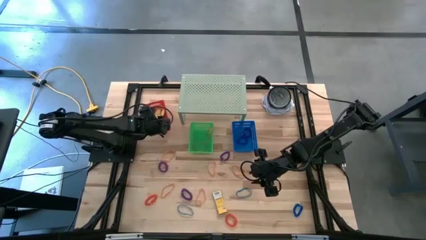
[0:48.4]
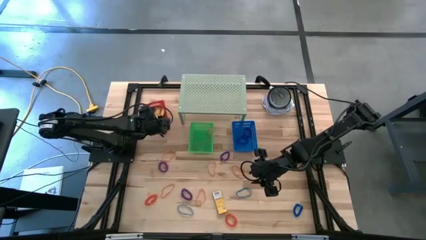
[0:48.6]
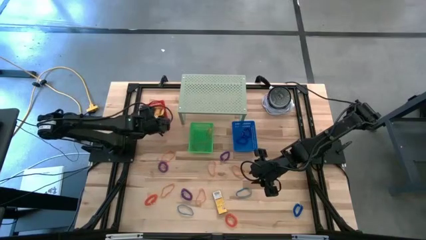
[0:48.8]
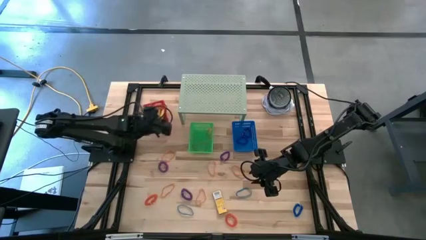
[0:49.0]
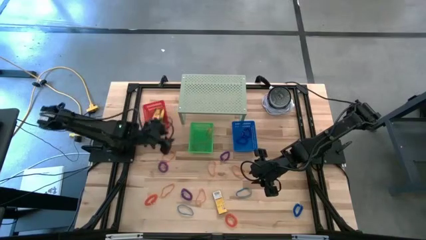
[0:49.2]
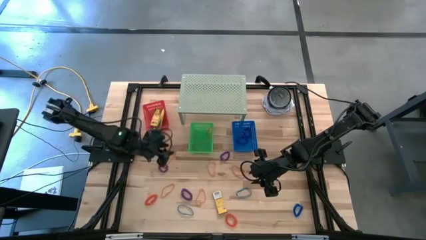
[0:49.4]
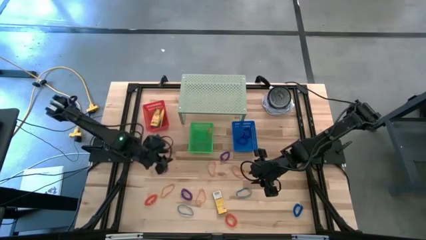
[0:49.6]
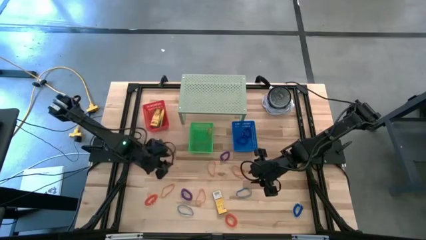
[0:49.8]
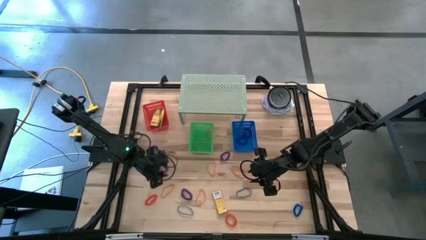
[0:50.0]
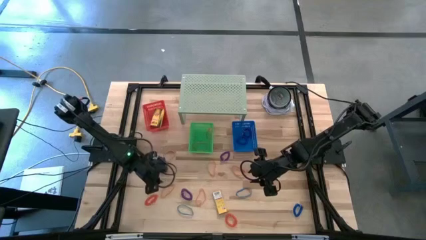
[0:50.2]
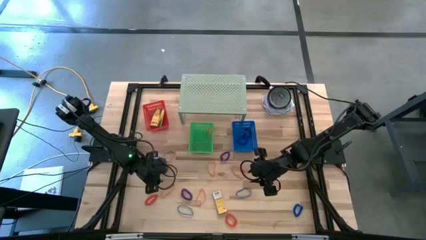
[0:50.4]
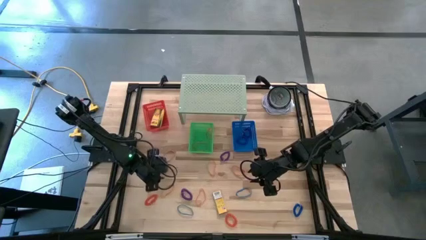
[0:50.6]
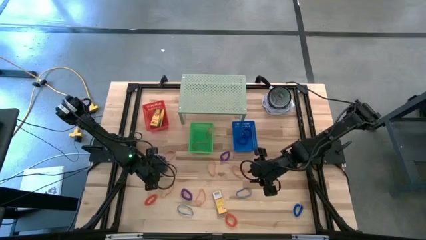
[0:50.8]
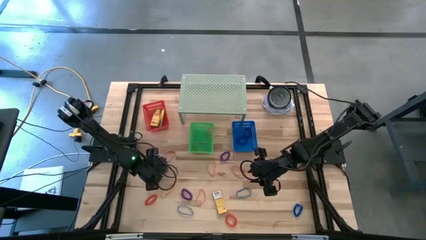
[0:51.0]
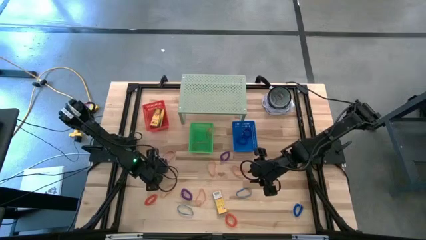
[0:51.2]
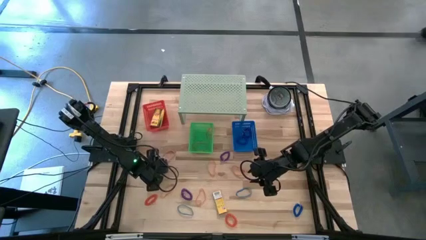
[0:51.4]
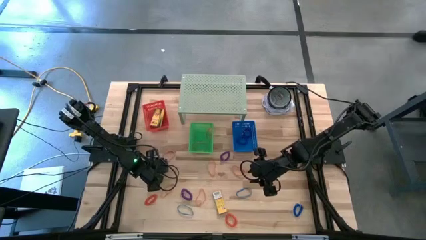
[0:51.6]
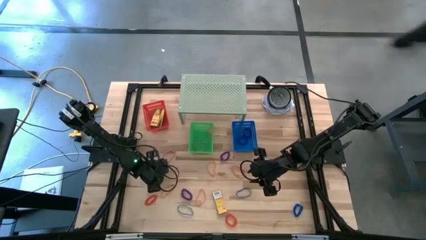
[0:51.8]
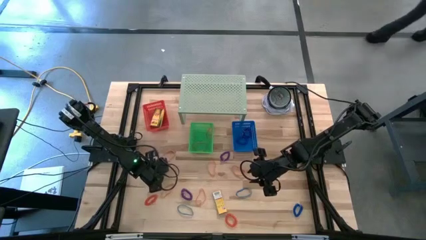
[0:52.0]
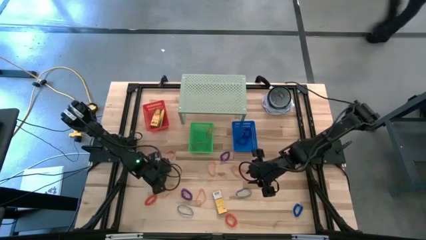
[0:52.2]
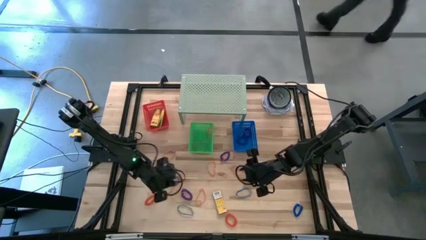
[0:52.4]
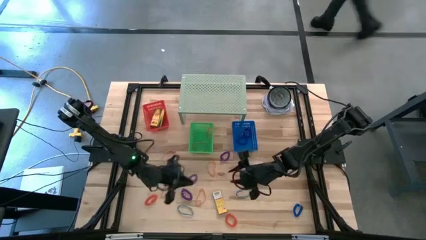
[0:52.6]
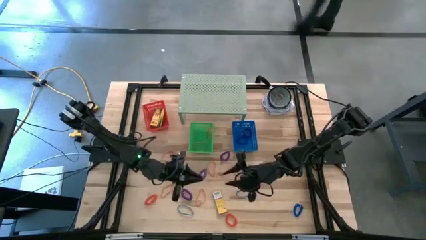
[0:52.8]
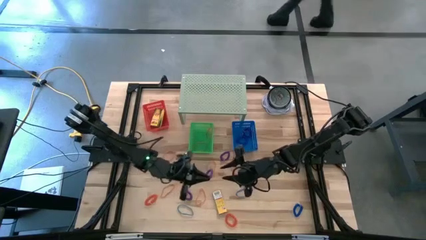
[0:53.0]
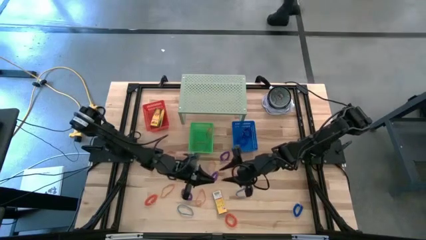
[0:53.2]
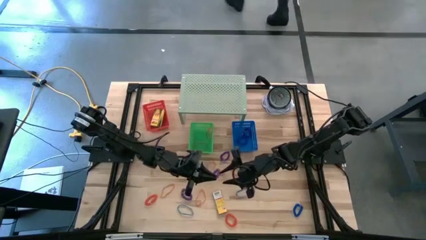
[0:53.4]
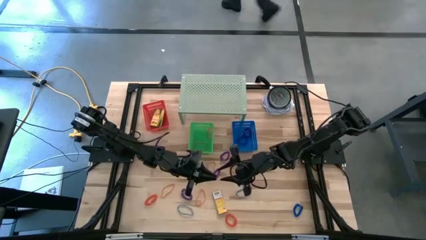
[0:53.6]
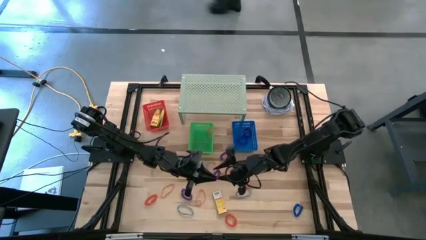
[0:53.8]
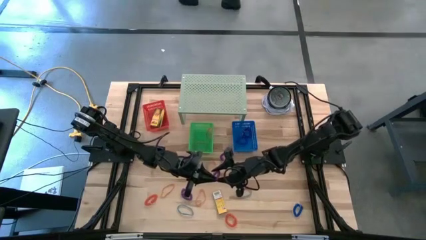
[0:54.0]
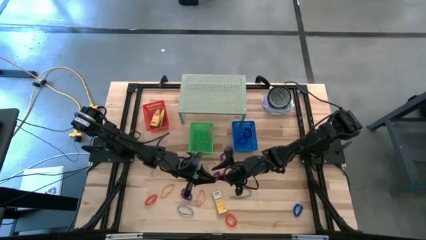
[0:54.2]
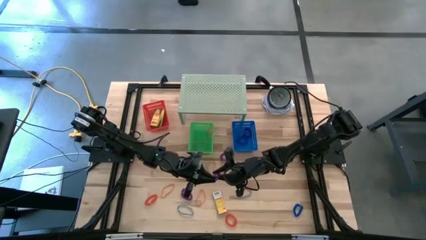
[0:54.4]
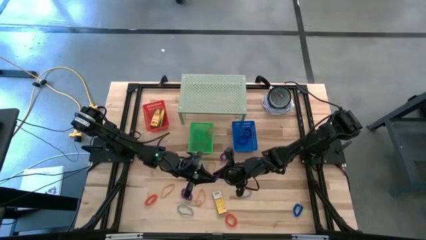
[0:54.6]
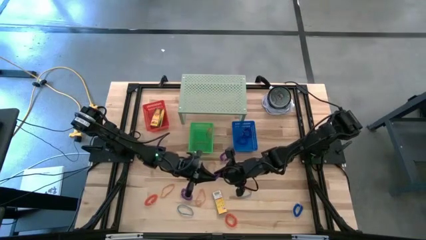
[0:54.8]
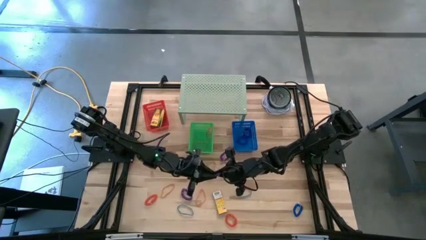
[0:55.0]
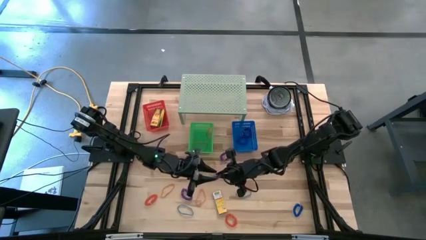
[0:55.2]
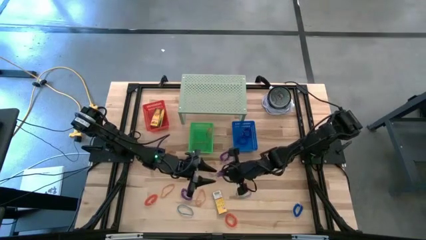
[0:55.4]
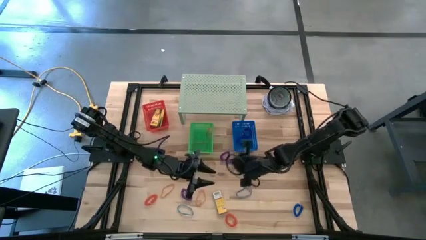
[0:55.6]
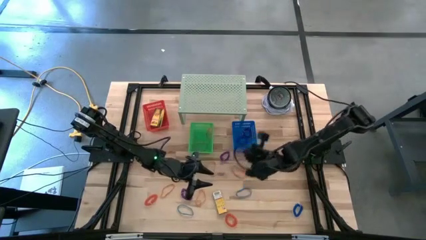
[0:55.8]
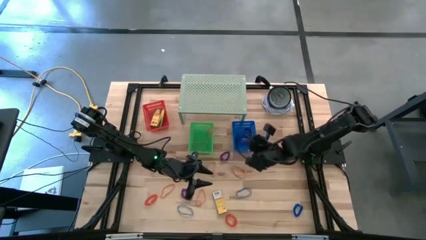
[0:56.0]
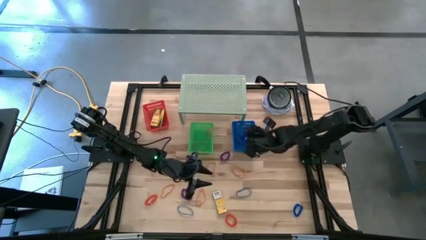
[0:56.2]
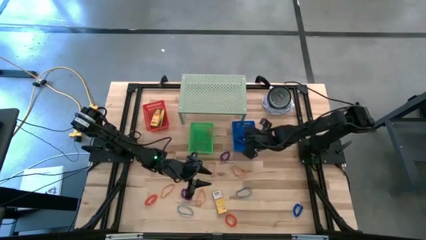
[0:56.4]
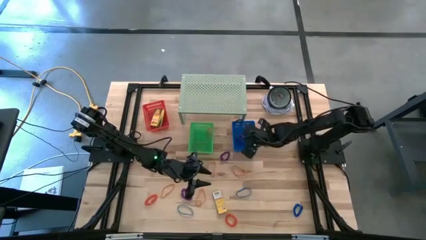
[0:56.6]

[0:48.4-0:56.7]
Task: Pick & Place Office Desk Supplies
Put the violet spring keychain into the blue bin

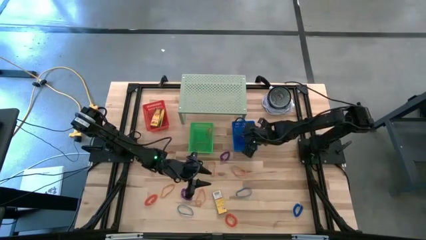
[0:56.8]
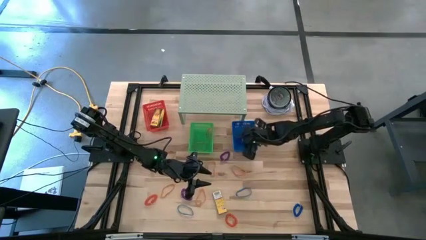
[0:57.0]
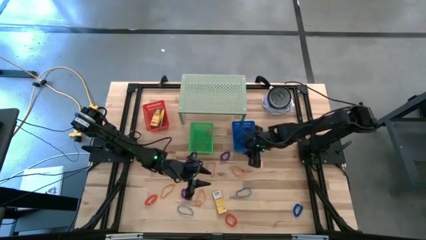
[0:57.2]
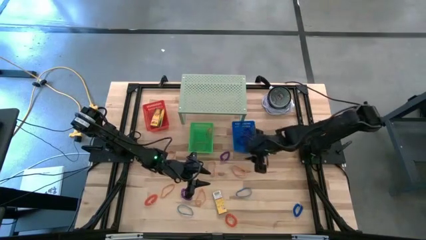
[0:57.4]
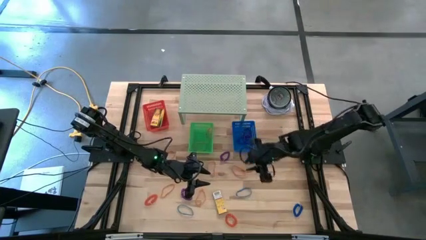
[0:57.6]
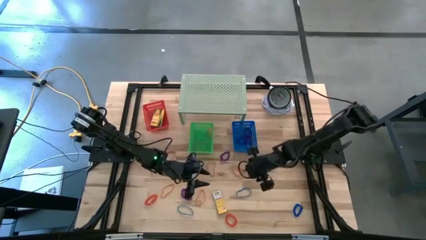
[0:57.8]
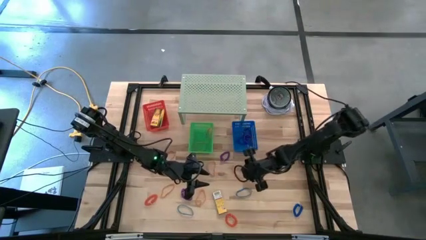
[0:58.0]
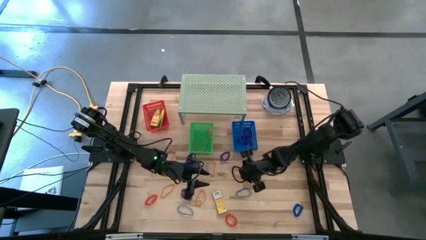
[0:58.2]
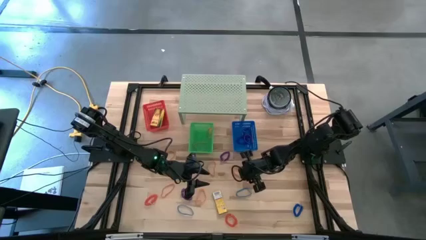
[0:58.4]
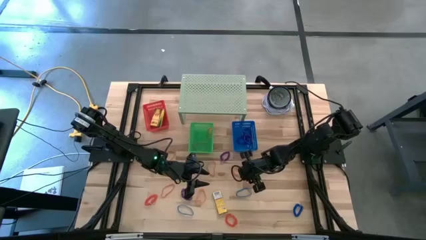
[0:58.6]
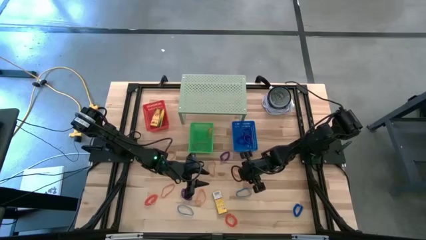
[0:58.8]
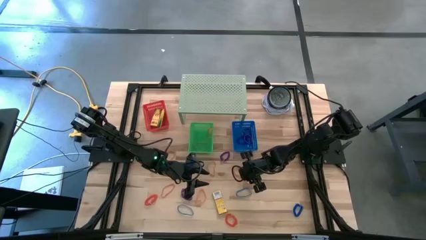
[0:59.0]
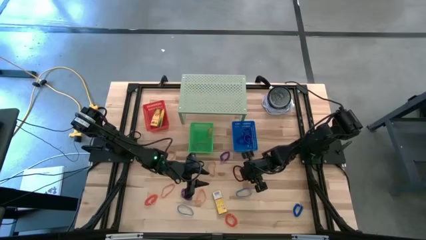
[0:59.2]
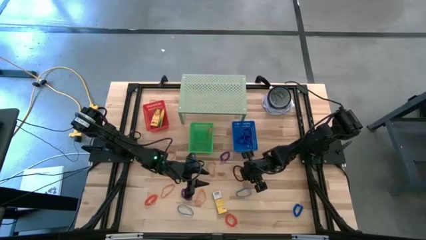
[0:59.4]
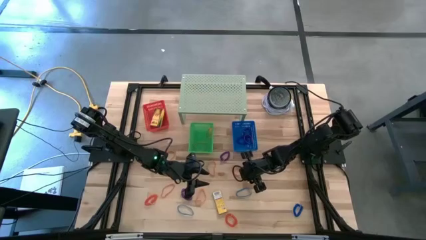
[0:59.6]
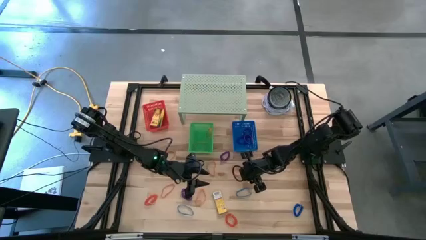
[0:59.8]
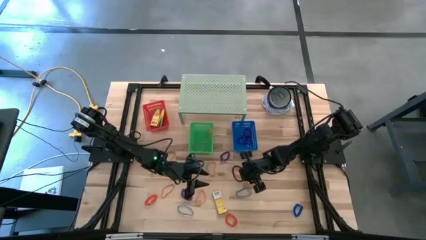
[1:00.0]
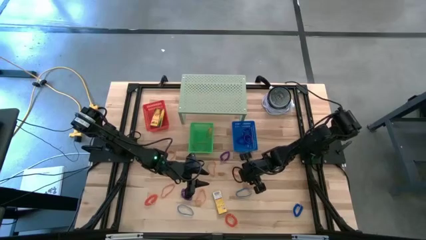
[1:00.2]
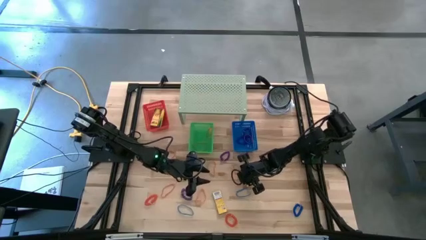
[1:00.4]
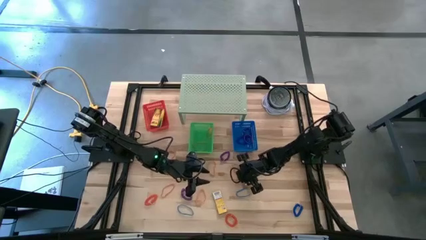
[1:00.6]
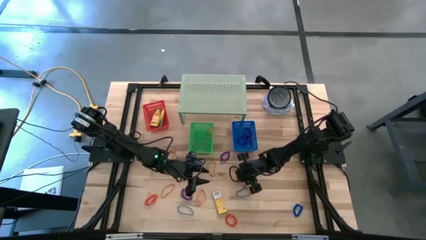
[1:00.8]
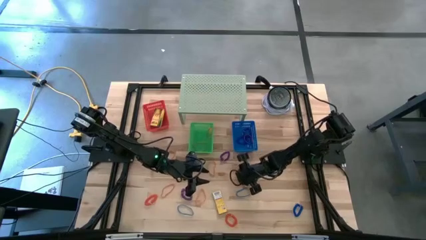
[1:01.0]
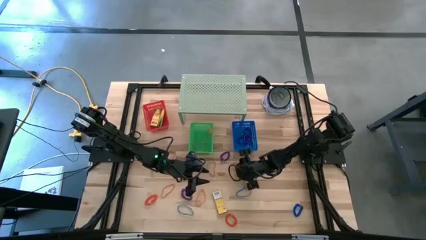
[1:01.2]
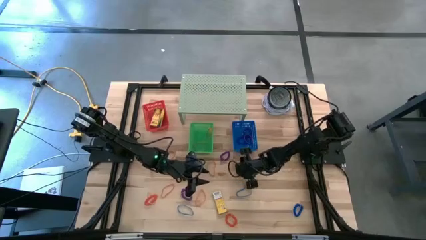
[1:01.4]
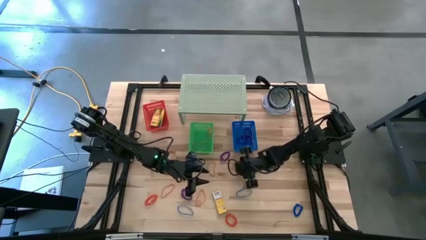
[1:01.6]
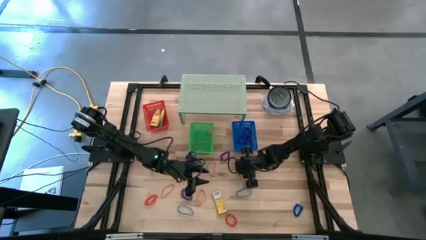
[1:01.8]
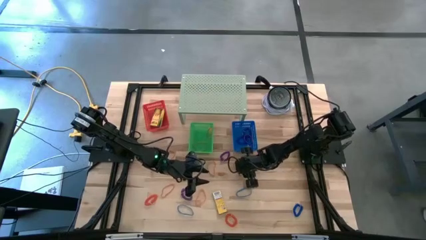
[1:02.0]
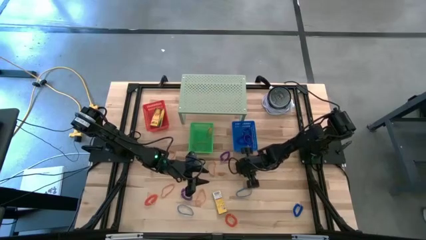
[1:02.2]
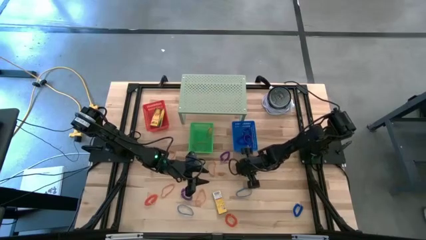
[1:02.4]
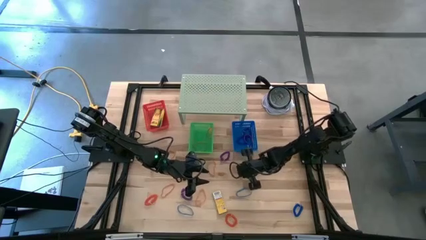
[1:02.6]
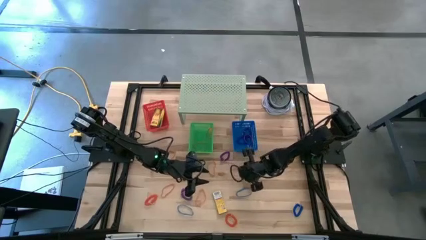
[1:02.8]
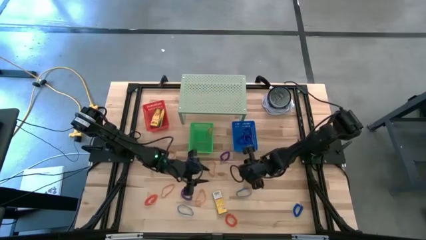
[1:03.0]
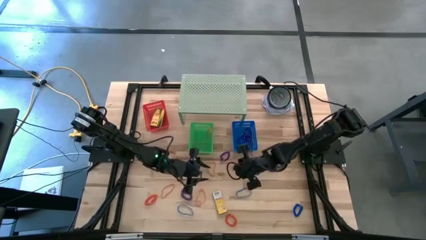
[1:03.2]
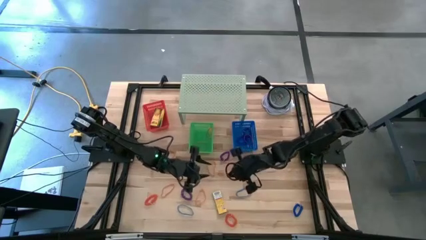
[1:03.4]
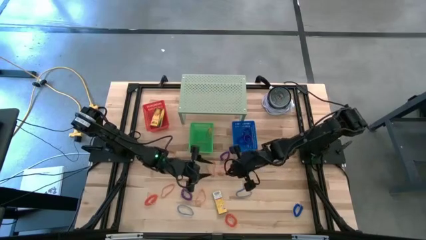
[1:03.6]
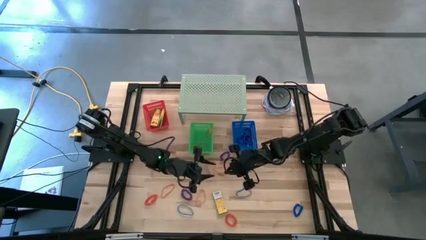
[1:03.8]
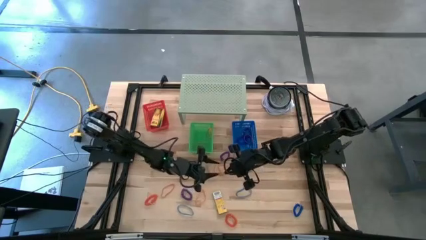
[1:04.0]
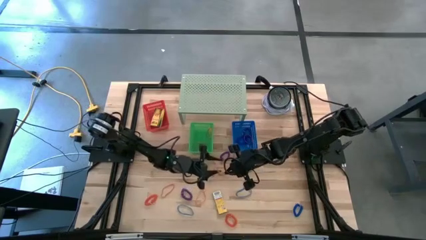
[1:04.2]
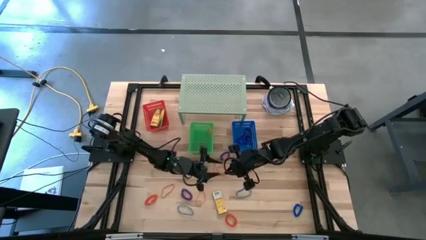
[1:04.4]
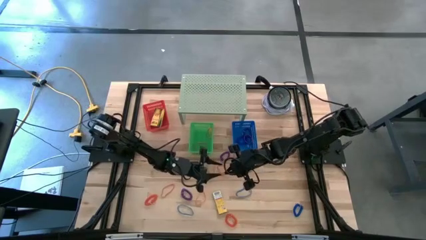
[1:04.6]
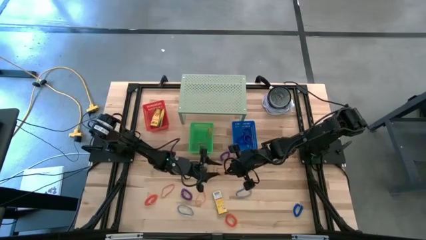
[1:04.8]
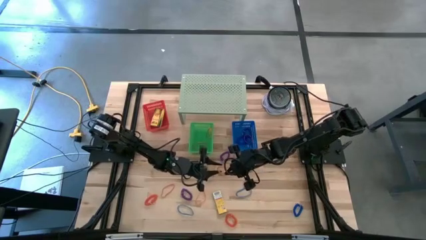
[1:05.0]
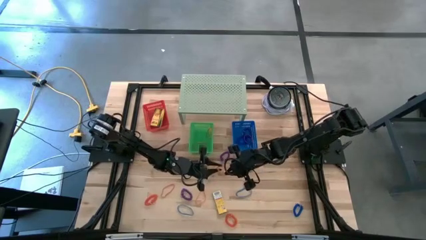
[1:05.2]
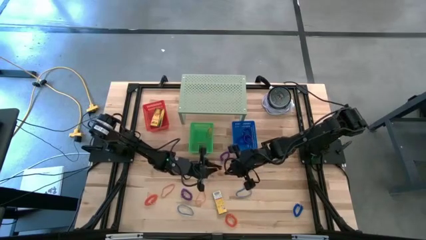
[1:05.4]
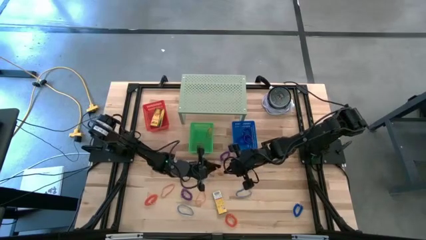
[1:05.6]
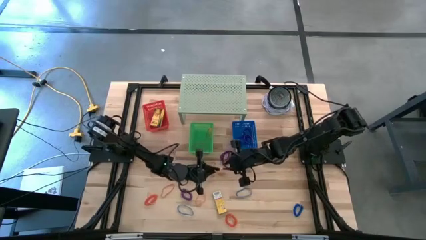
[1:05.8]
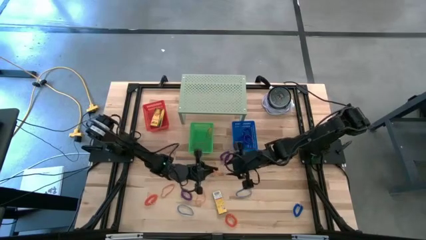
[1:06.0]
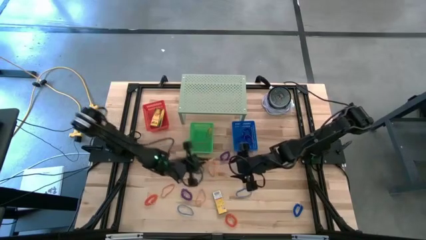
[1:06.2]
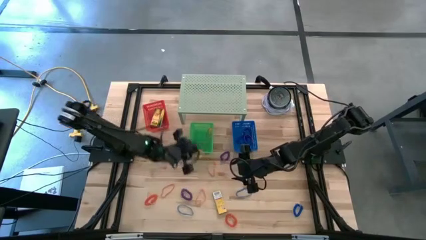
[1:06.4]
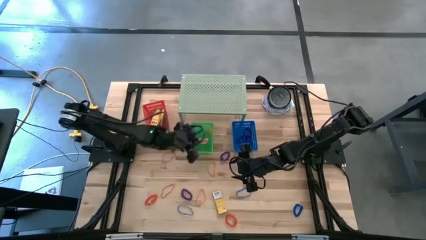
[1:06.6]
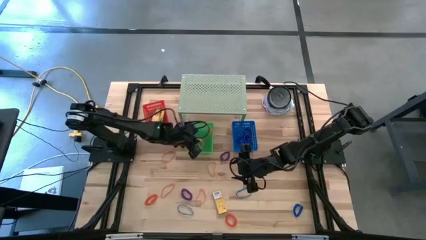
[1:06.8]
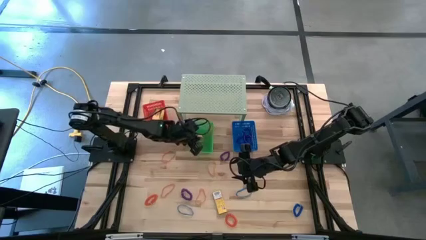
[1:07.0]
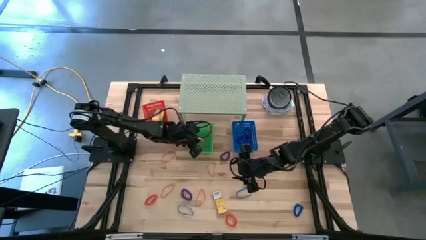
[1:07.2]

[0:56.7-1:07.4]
Put the orange rubber band into the green bin
